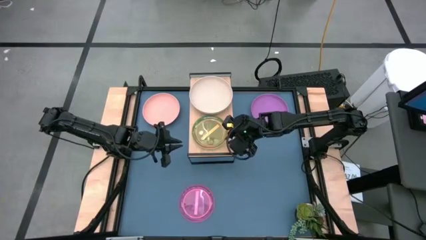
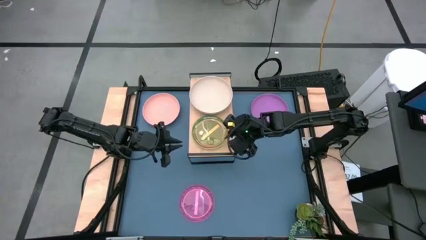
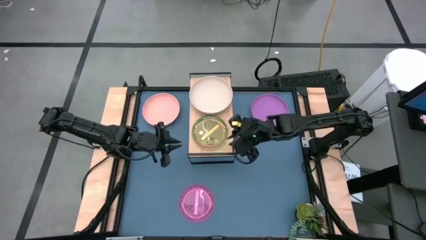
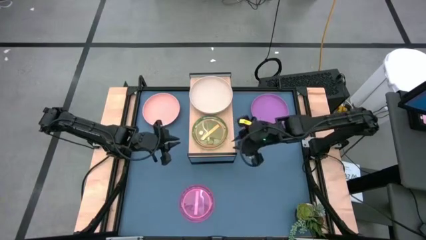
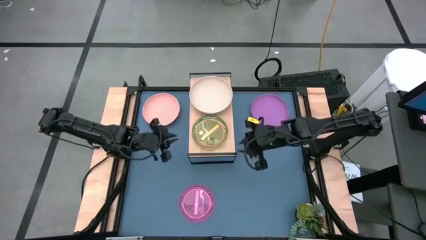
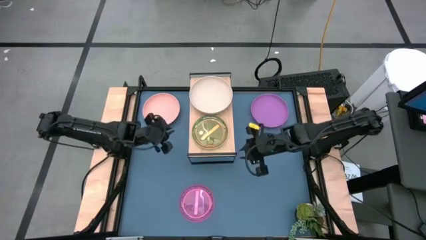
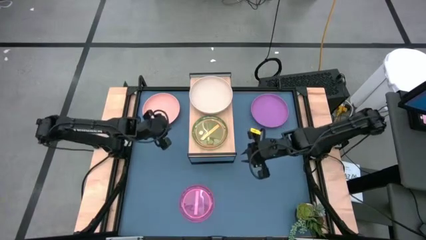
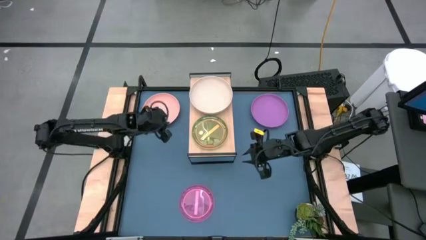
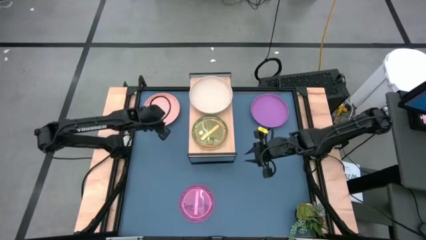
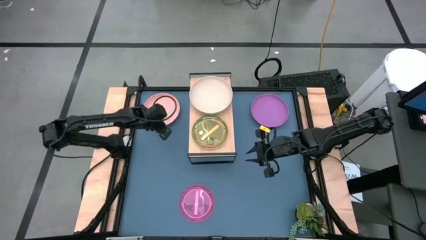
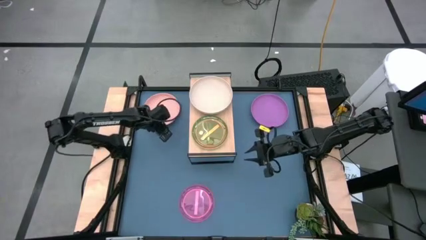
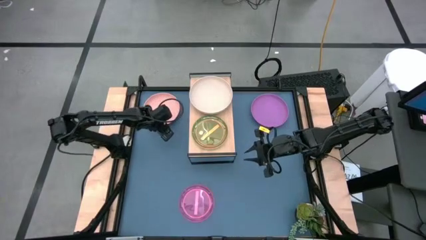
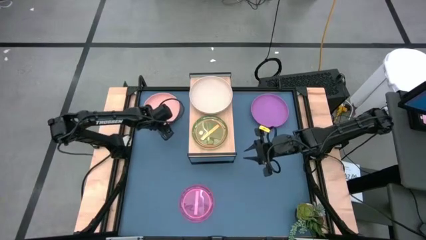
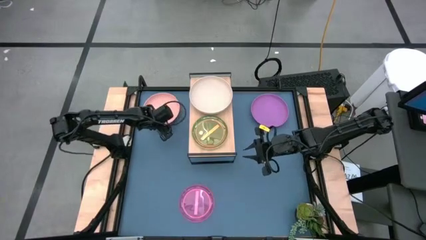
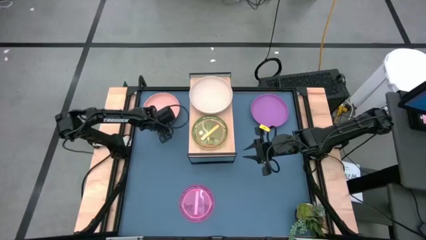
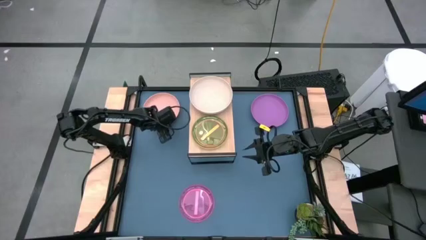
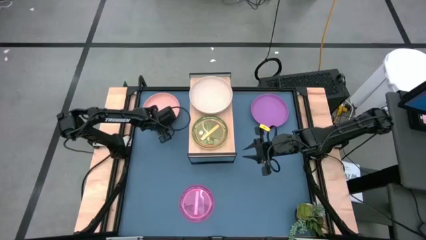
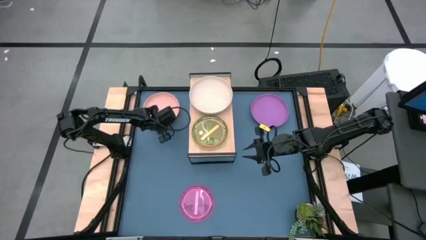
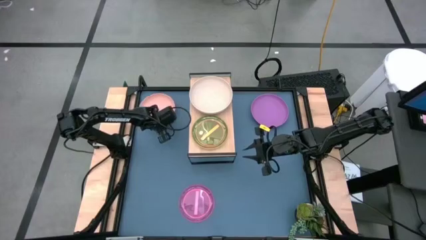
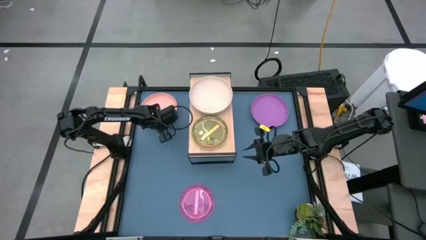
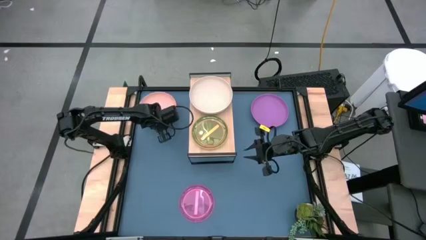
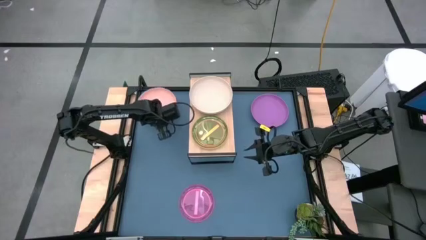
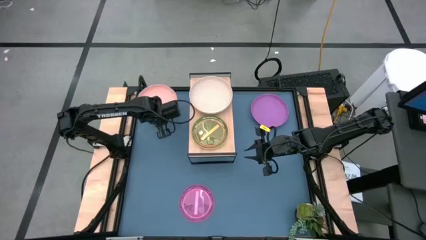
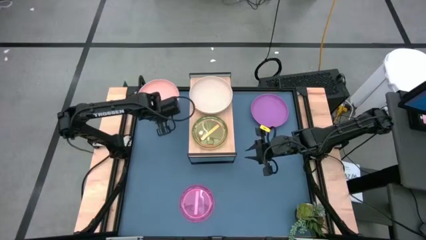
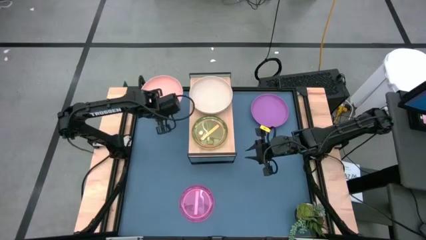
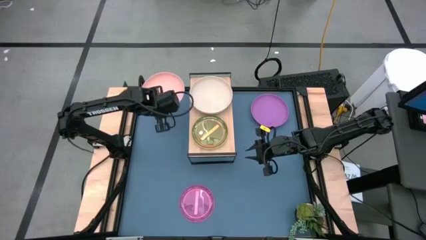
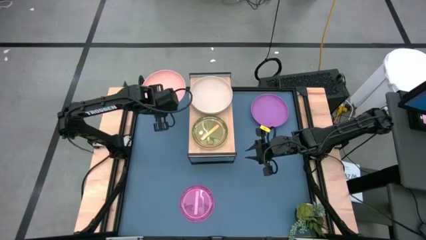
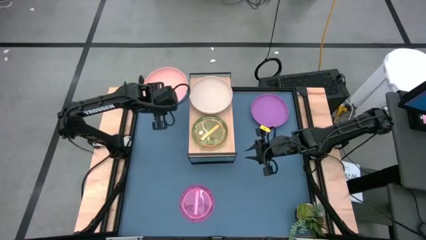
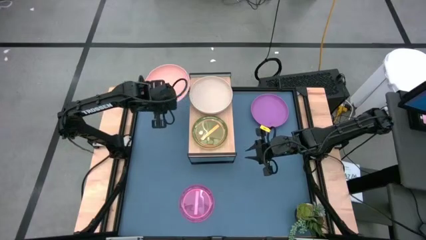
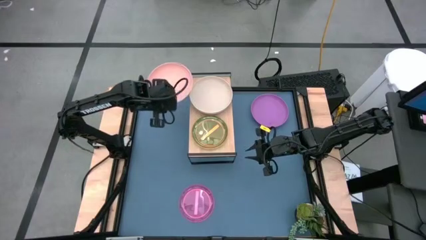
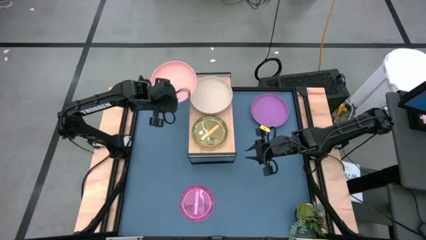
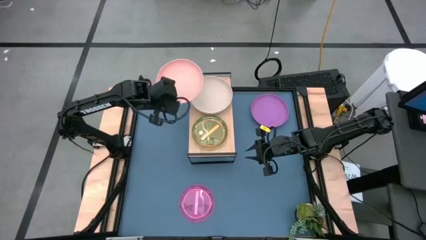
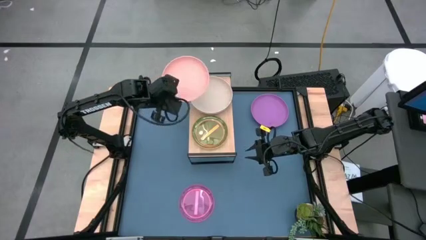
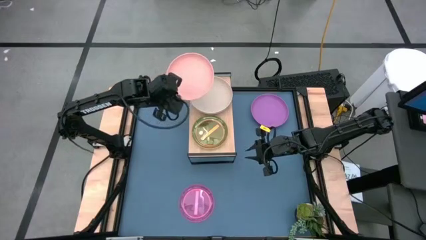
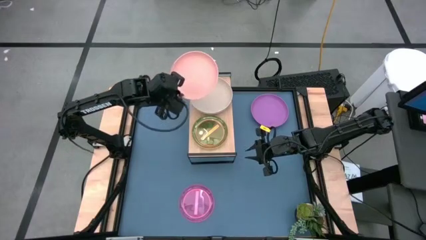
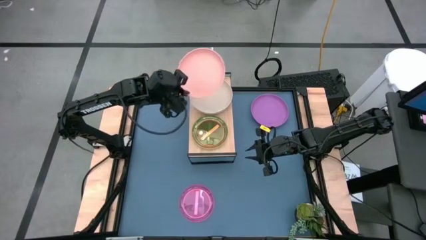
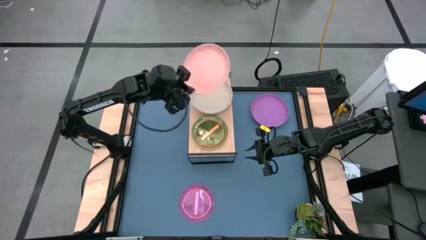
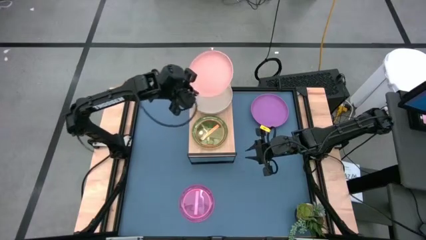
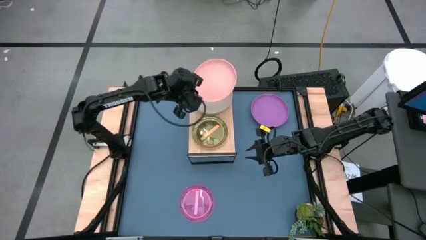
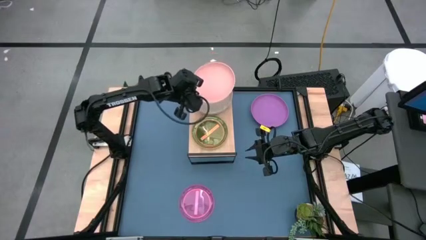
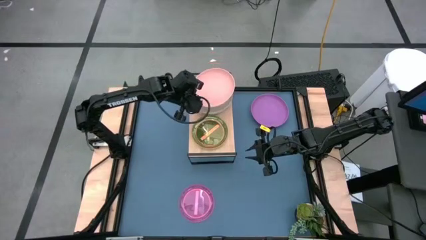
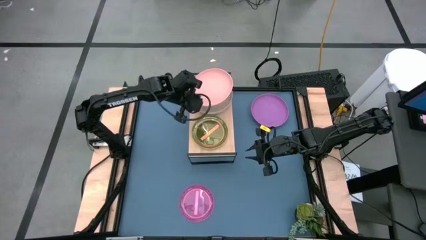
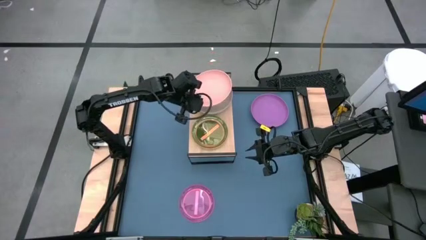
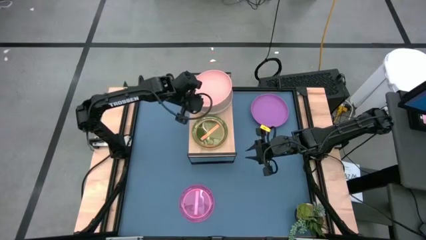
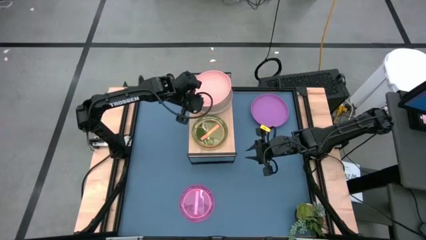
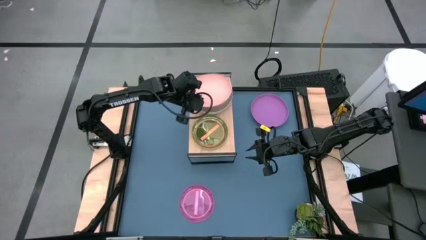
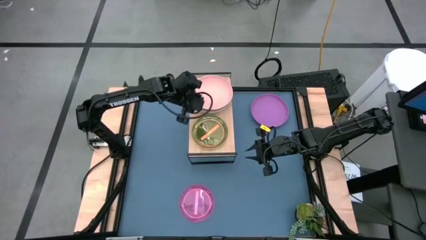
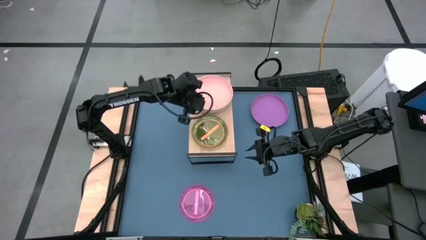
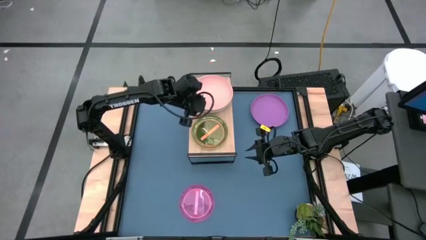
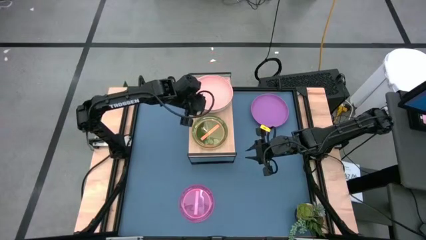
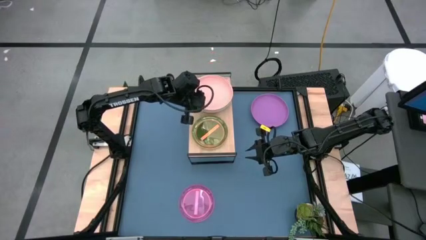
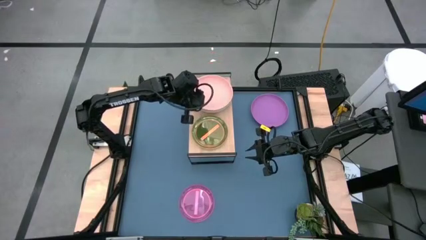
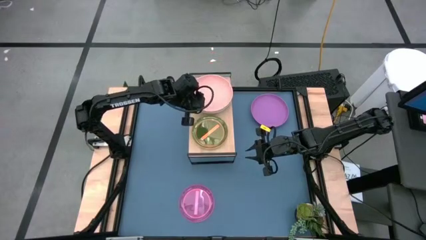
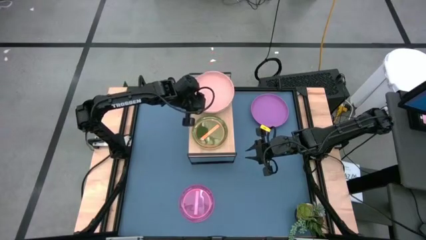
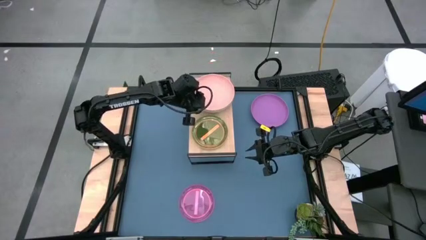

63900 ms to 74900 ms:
Task: Place and stack plates onto a shelf
Stack the pink plate on top of the brown plate on the shelf

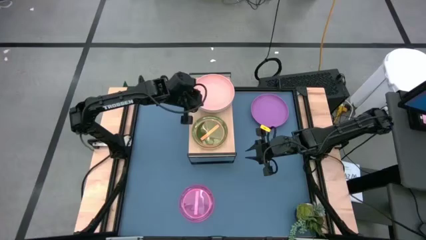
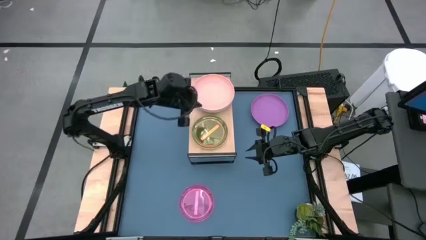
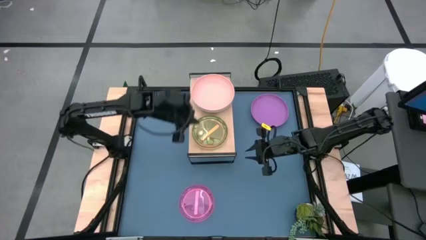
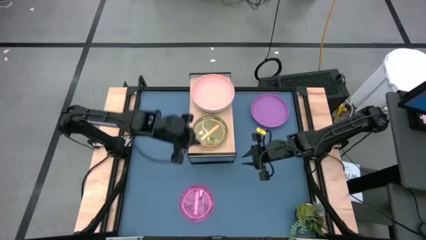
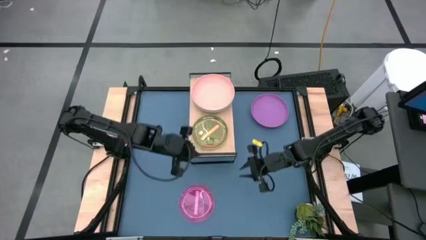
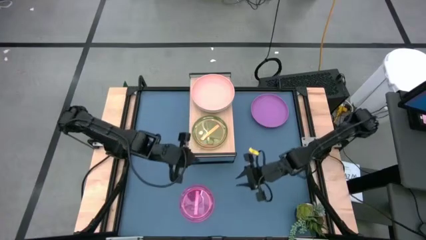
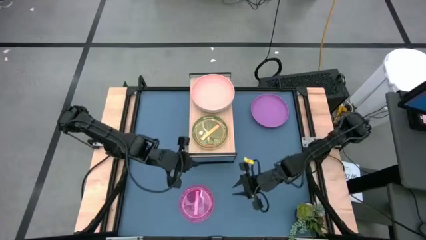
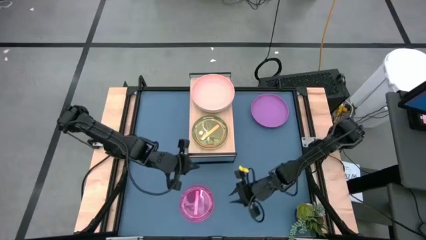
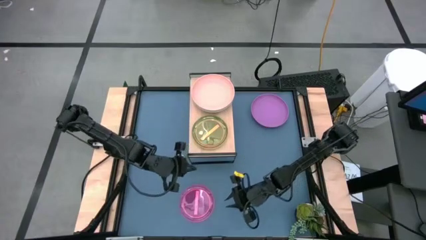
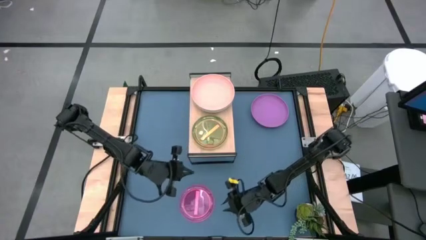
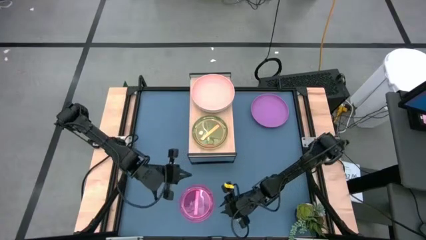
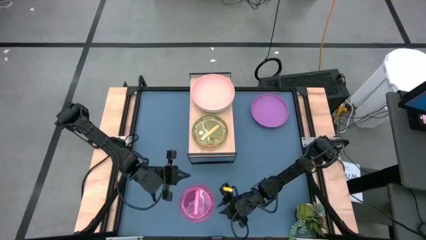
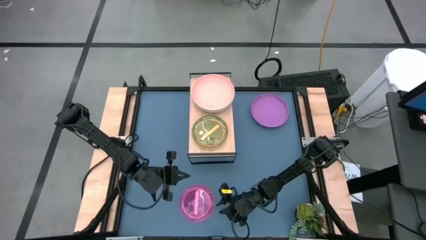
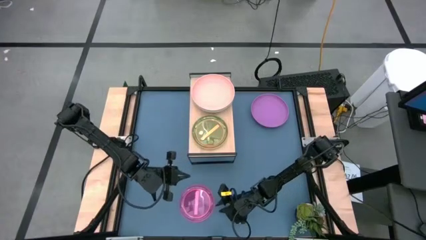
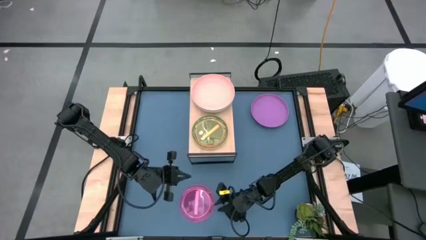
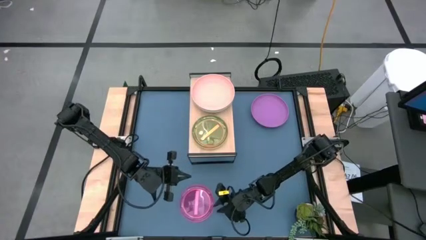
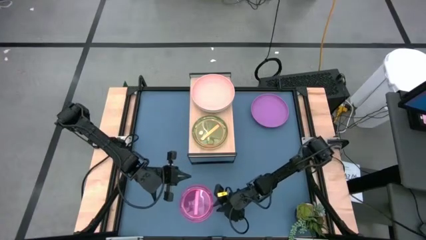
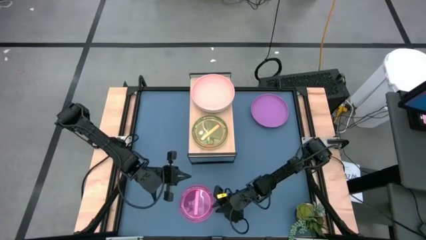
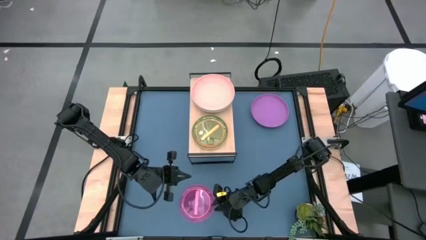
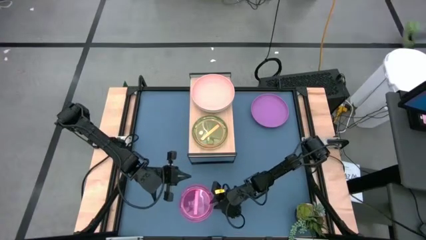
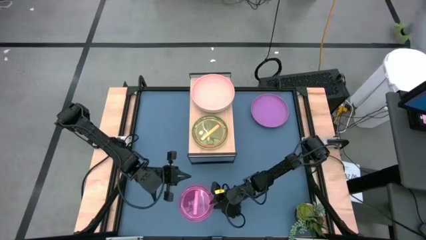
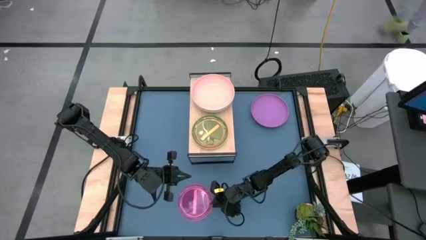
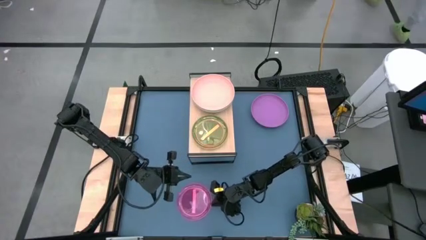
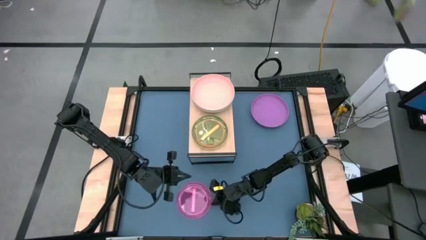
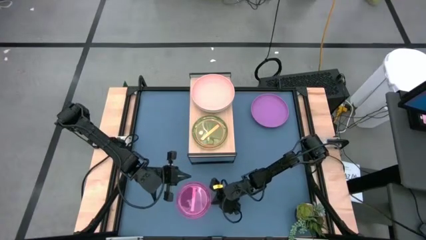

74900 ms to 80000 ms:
Stack the light pink plate on top of the orange plate on the shelf
